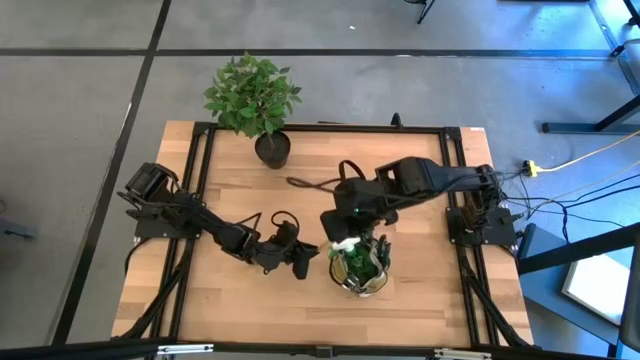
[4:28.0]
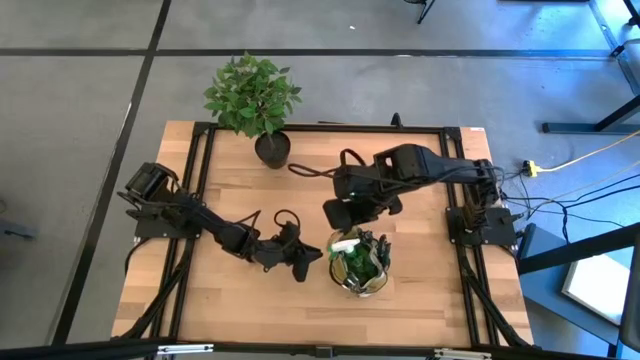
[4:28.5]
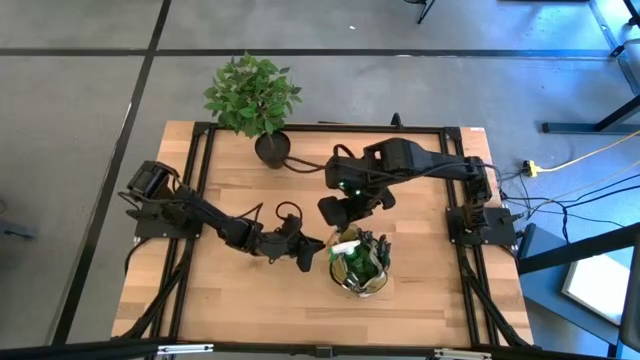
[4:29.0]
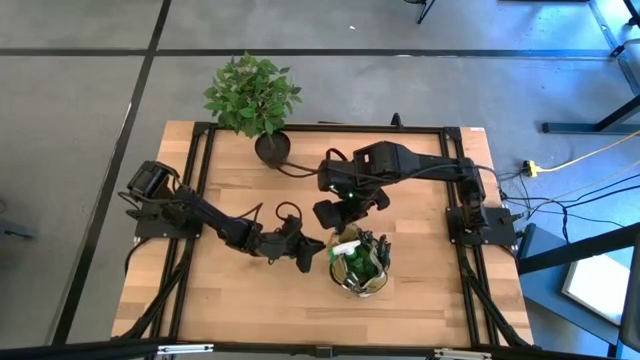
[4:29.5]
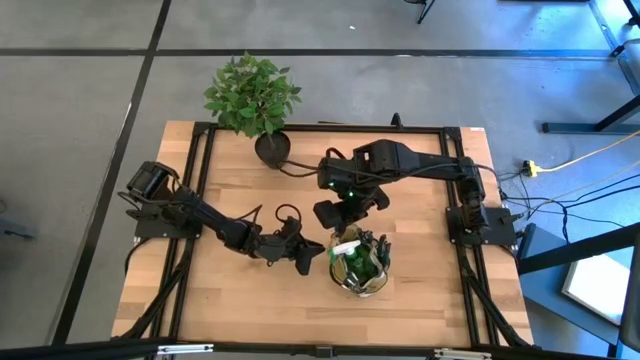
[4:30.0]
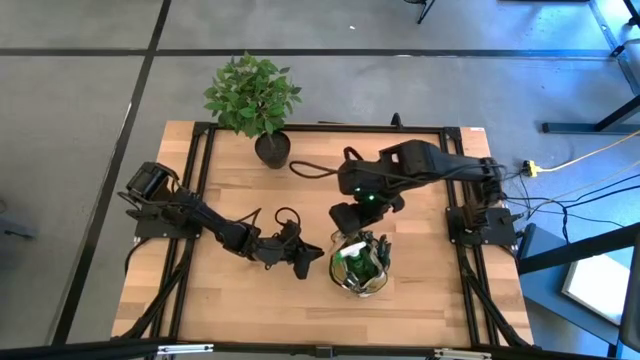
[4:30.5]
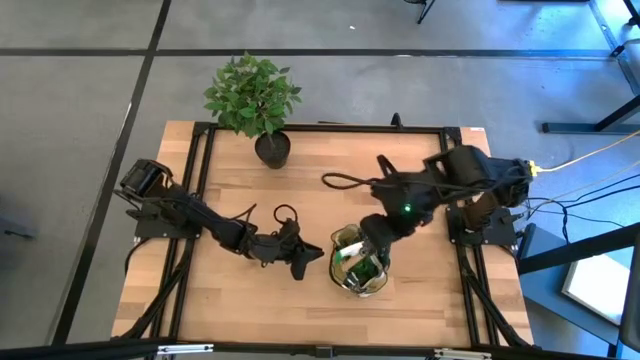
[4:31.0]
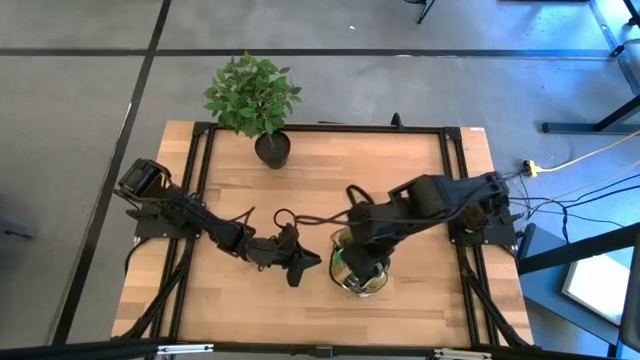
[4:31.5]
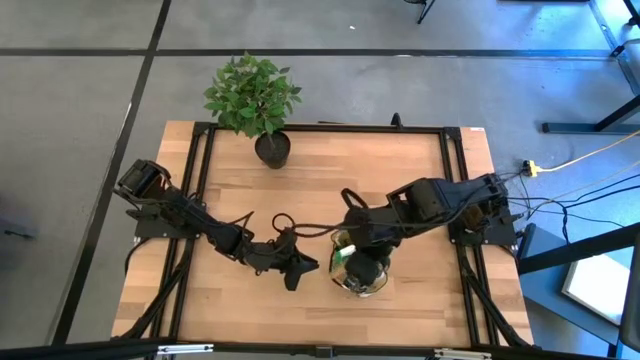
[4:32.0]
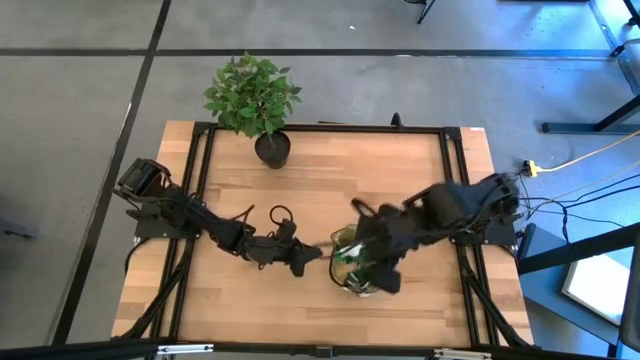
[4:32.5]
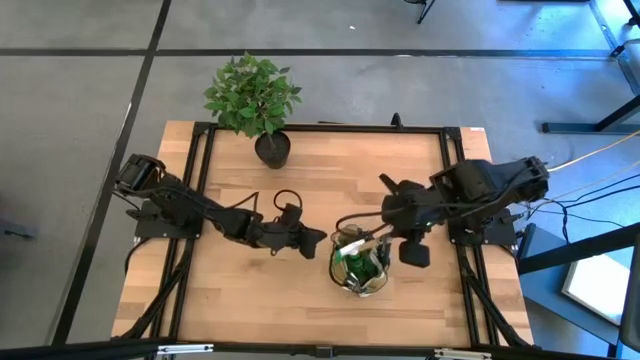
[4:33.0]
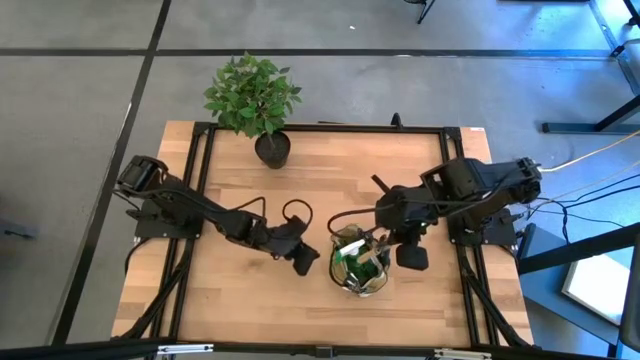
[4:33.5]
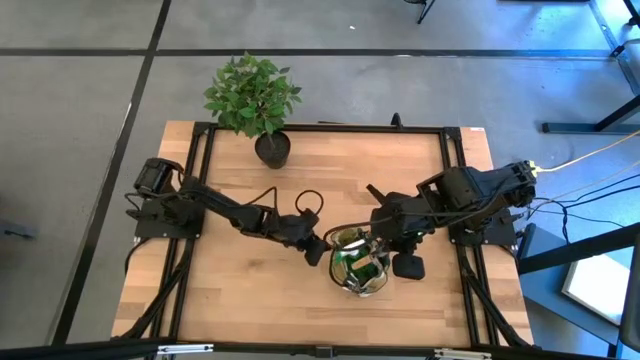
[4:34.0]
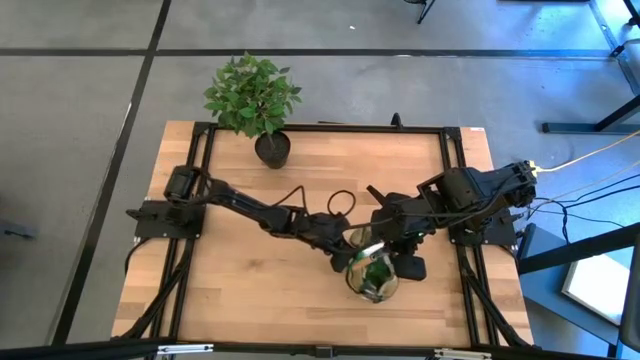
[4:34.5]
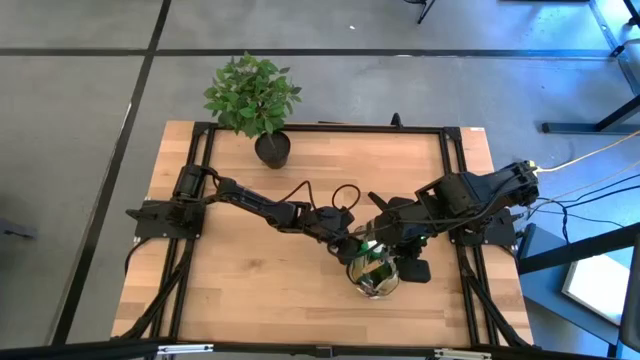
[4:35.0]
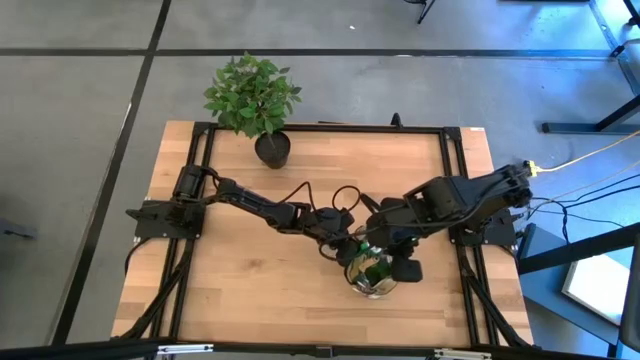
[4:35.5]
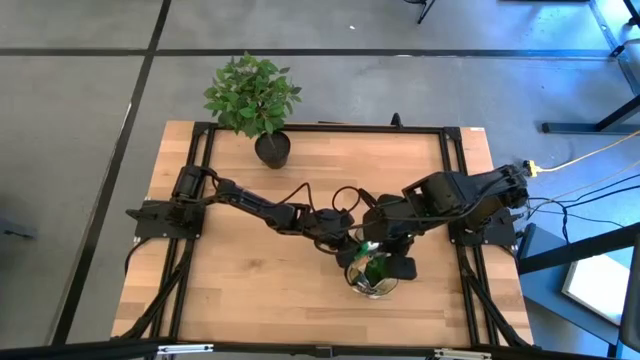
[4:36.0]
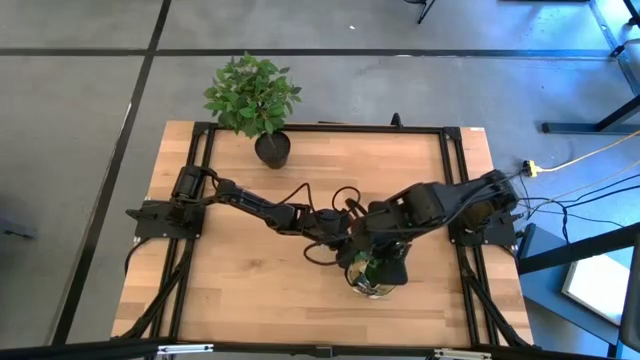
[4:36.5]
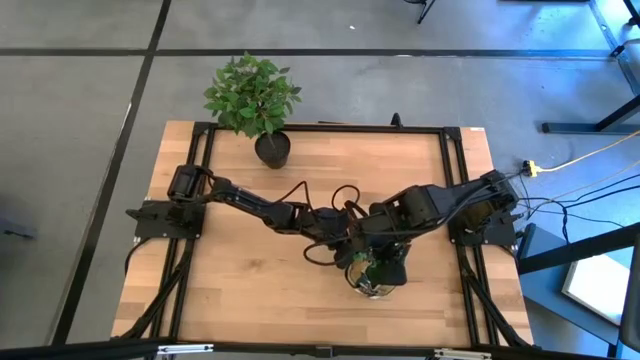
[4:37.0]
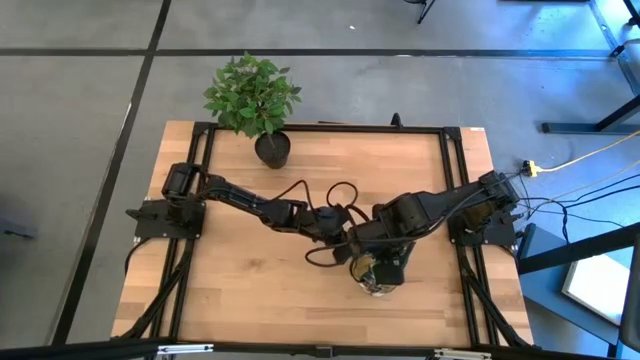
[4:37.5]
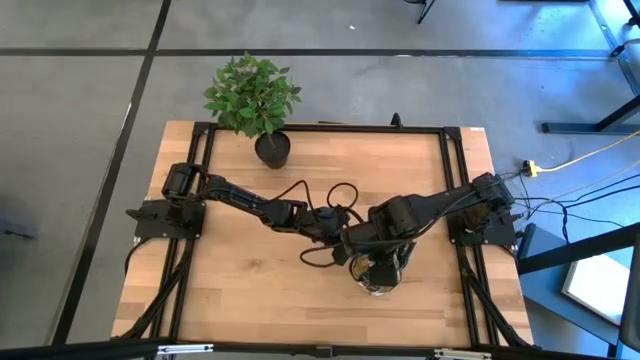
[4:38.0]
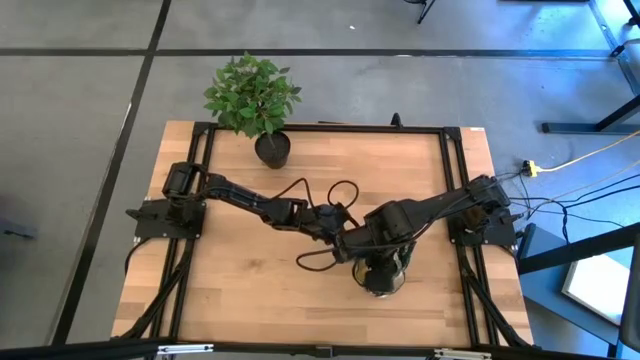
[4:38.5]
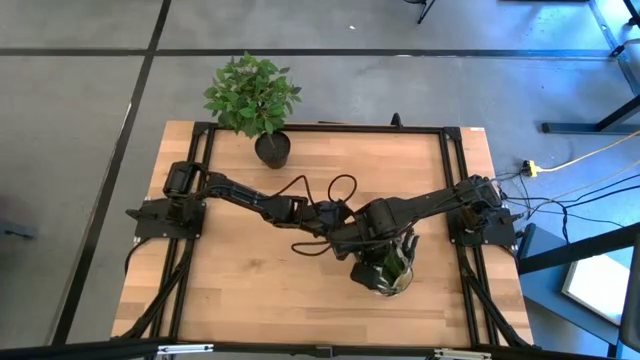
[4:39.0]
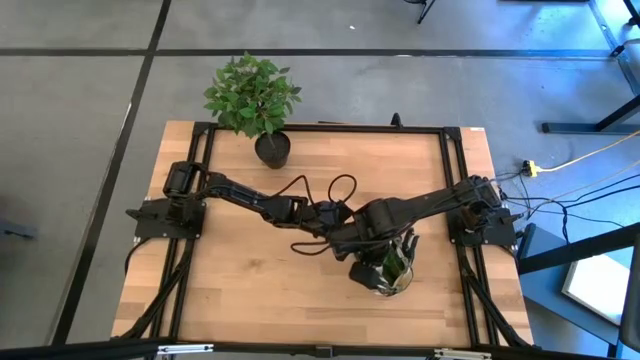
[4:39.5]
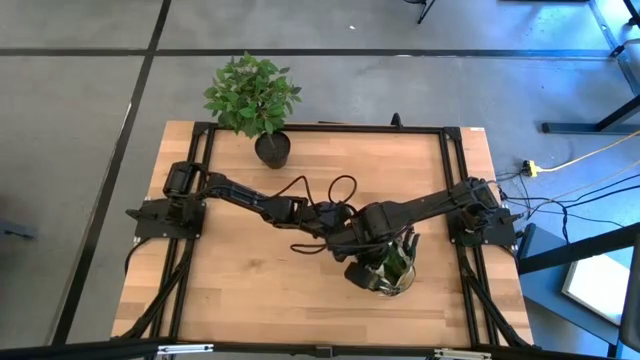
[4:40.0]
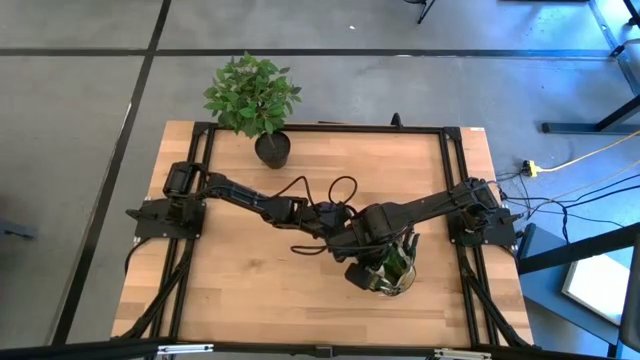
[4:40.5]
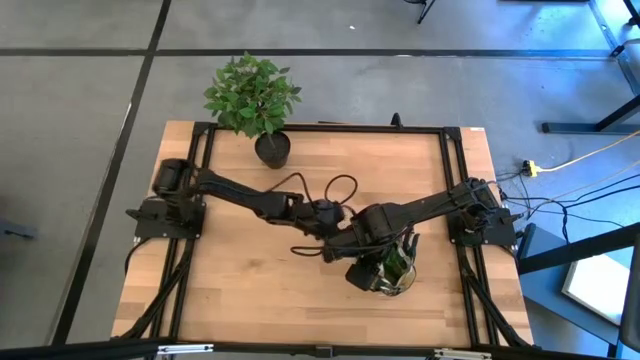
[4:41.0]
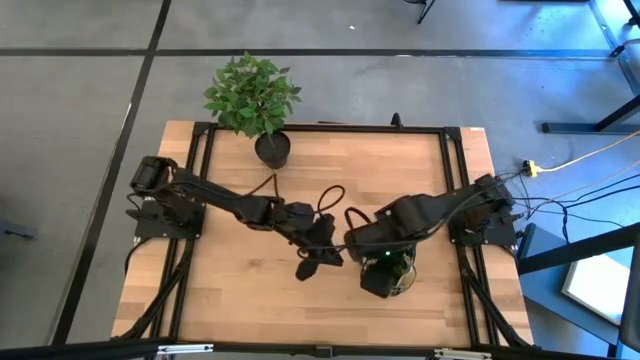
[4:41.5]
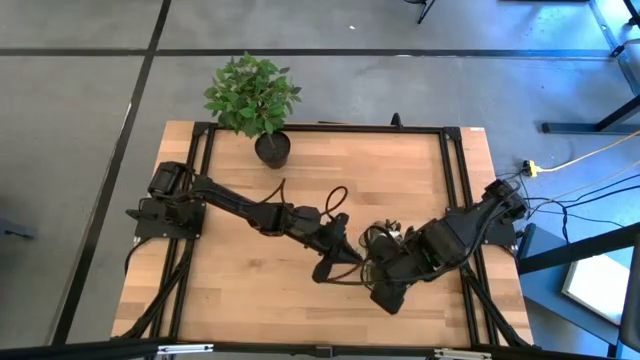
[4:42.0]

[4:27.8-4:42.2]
Task: Pick & Place Garden tools in Gardening bag
Put the brown trowel into the brown gardening bag

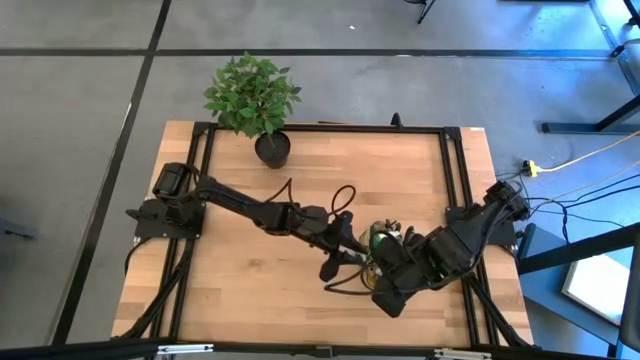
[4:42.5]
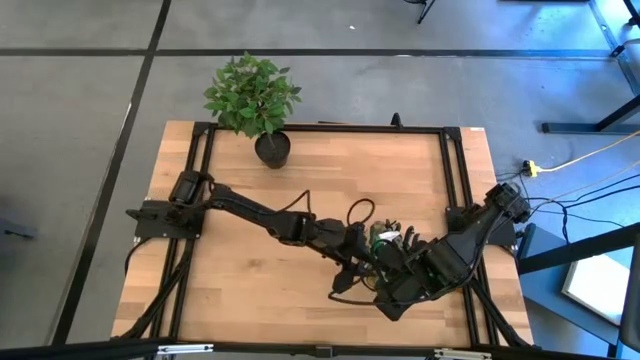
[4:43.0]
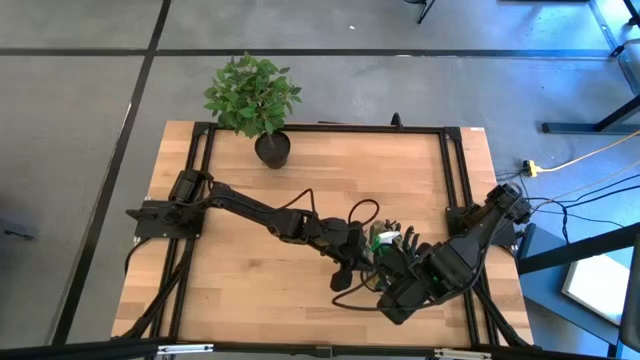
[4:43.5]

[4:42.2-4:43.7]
Put the brown trowel into the brown gardening bag

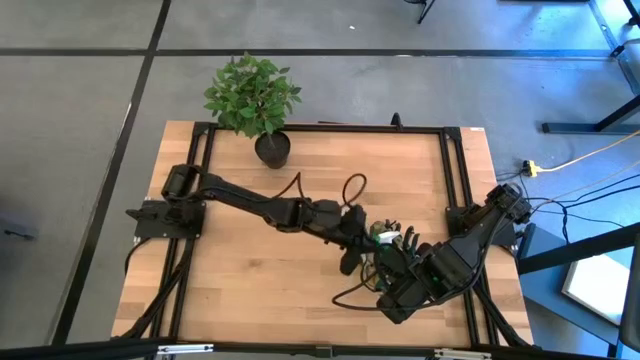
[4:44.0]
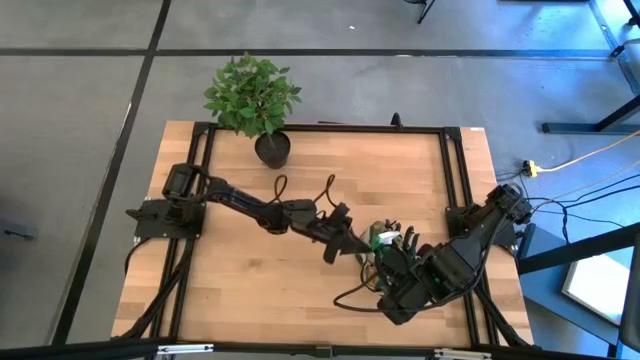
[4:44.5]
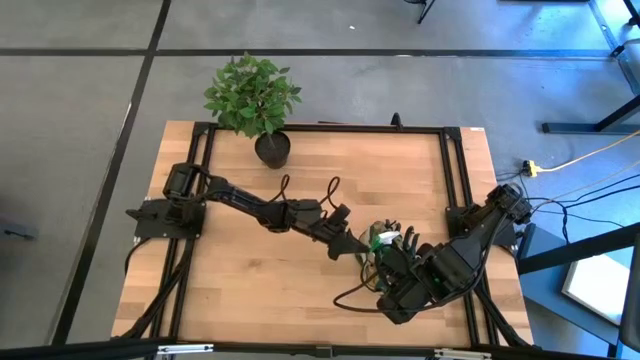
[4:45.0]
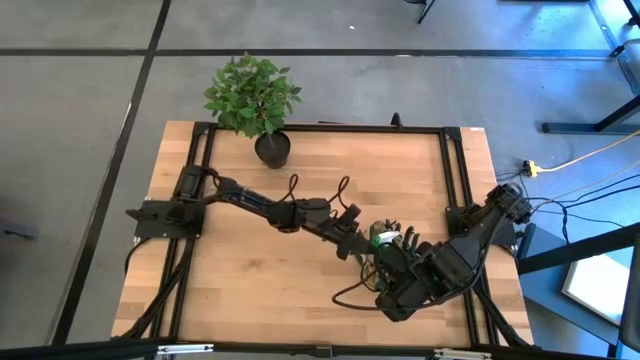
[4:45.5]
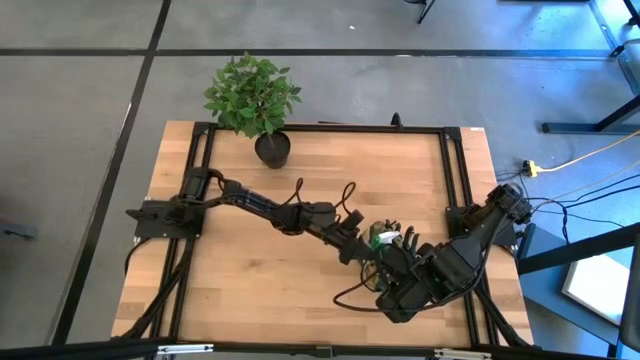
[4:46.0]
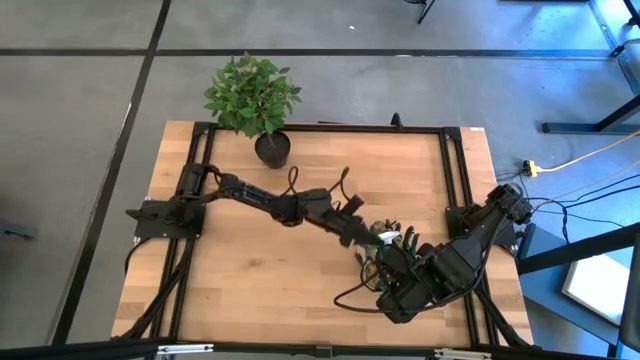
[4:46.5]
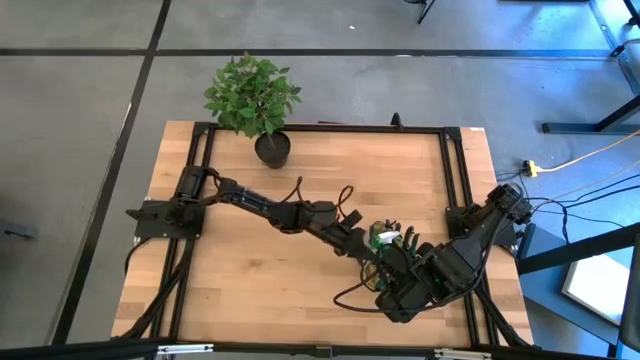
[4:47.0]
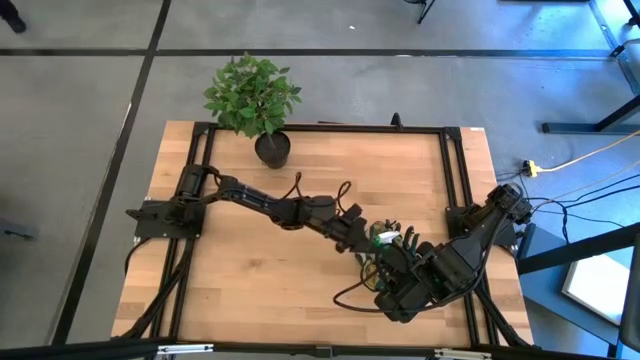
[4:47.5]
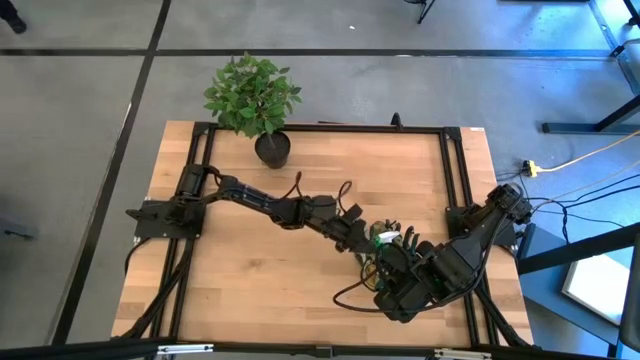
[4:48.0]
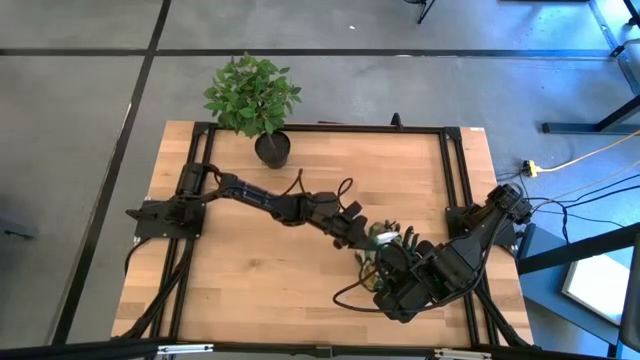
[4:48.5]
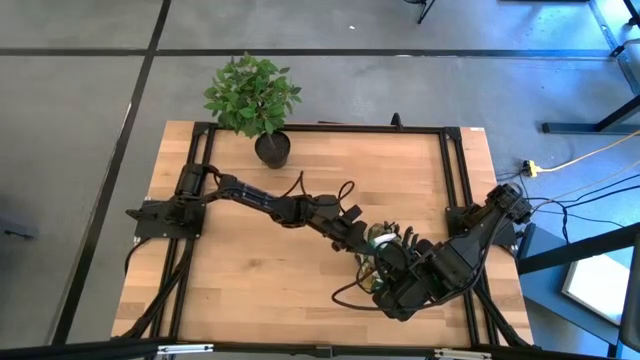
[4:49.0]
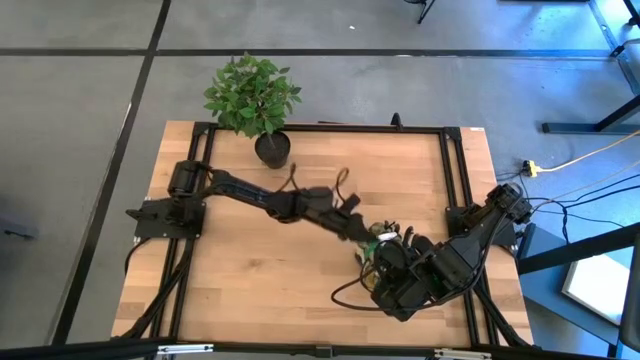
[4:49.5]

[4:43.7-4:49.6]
Put the brown trowel into the brown gardening bag
